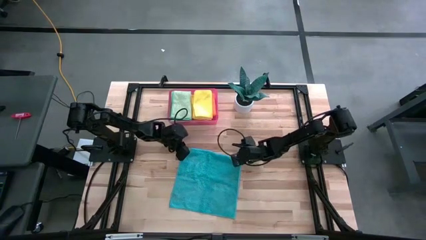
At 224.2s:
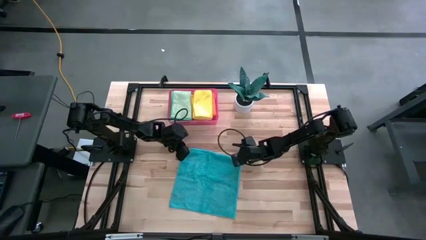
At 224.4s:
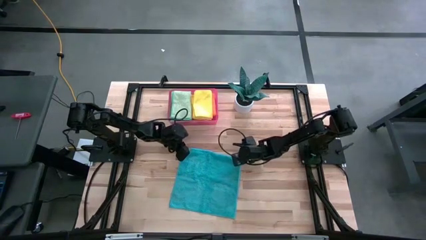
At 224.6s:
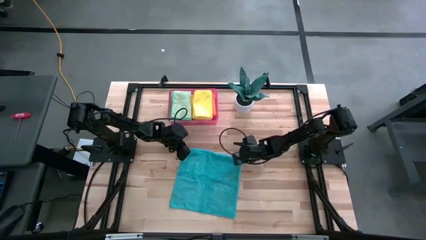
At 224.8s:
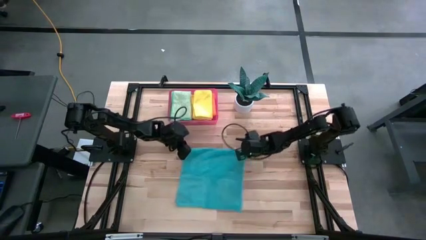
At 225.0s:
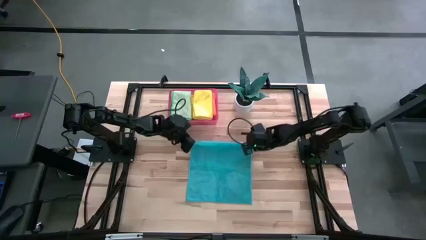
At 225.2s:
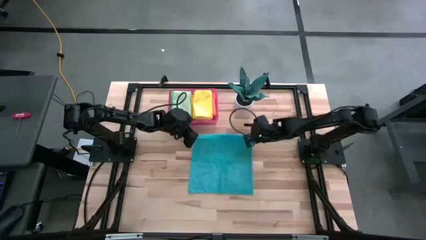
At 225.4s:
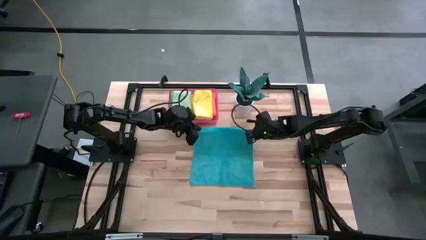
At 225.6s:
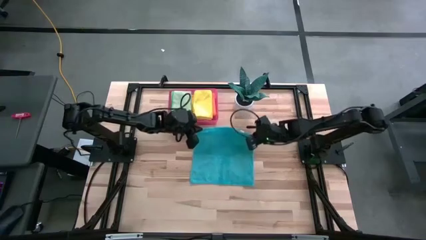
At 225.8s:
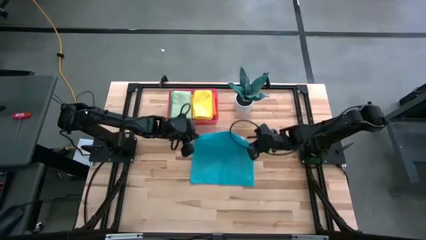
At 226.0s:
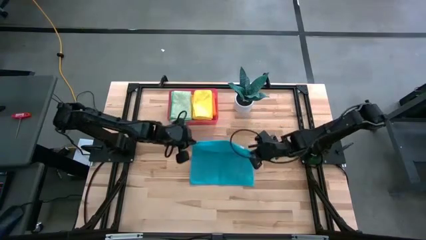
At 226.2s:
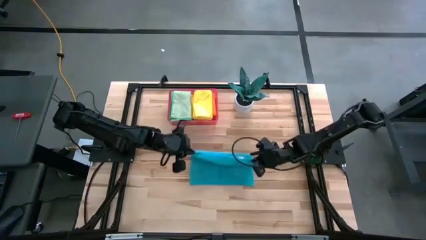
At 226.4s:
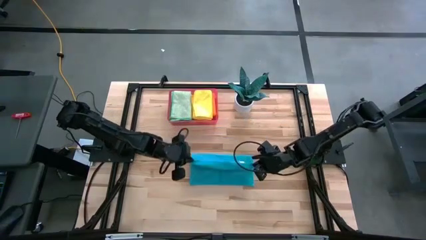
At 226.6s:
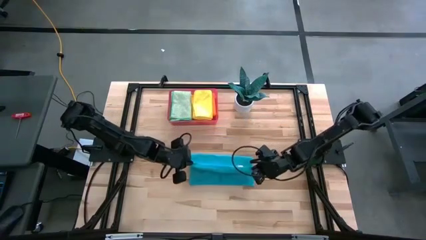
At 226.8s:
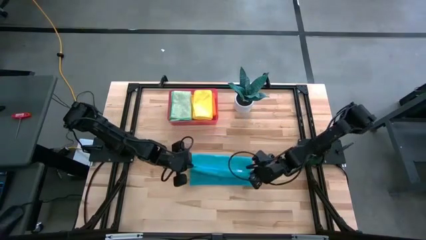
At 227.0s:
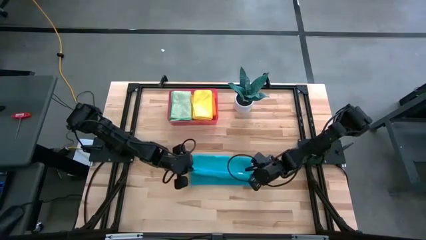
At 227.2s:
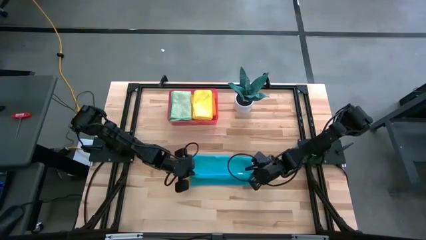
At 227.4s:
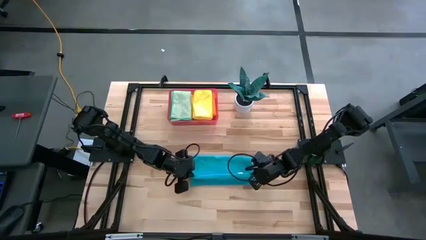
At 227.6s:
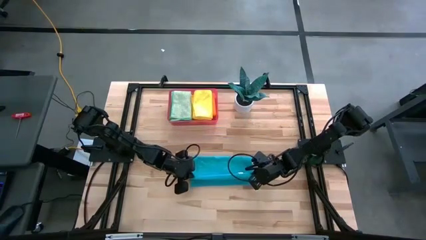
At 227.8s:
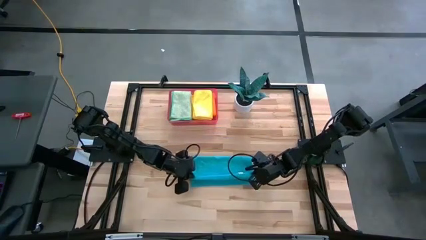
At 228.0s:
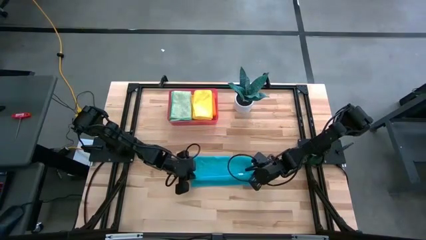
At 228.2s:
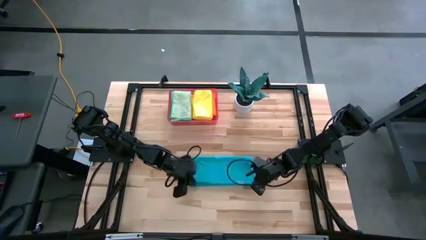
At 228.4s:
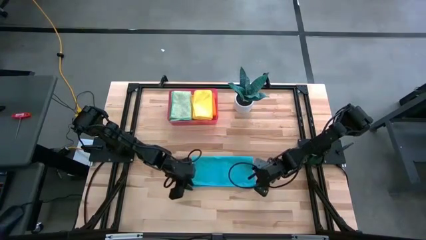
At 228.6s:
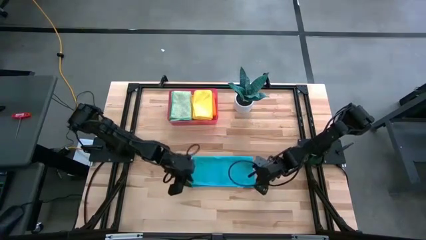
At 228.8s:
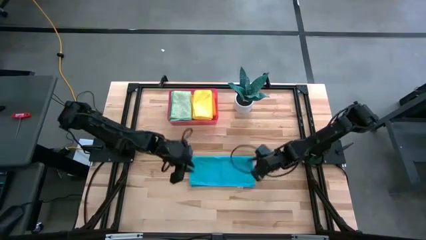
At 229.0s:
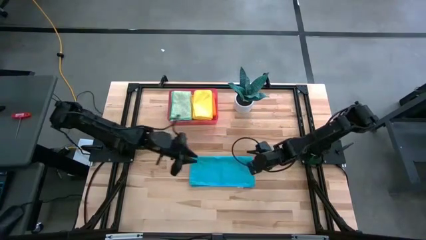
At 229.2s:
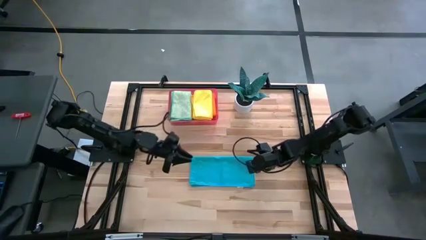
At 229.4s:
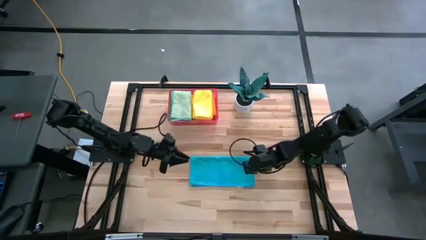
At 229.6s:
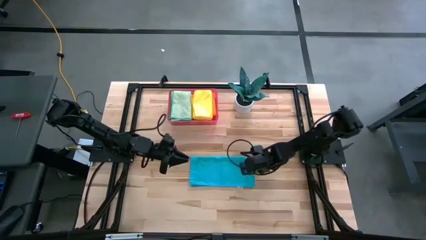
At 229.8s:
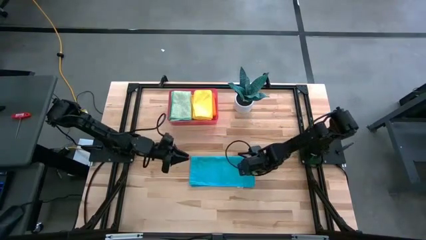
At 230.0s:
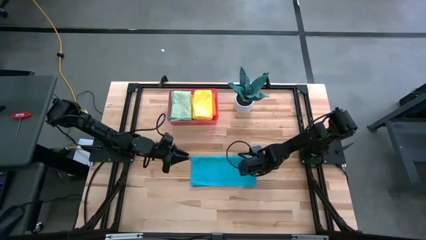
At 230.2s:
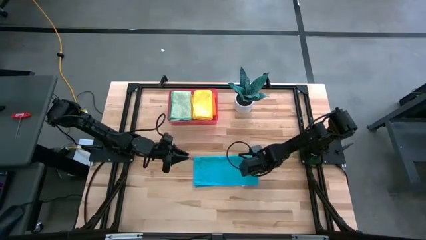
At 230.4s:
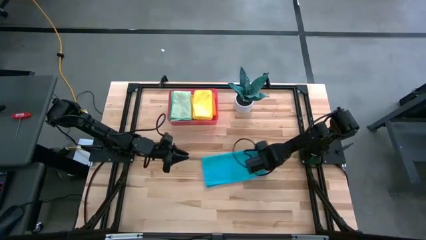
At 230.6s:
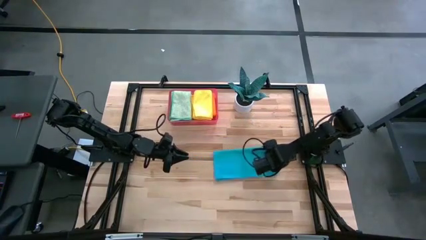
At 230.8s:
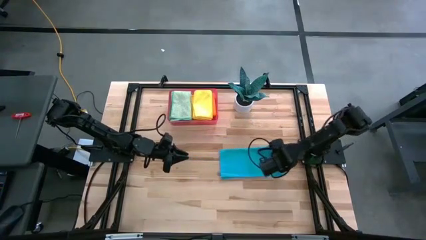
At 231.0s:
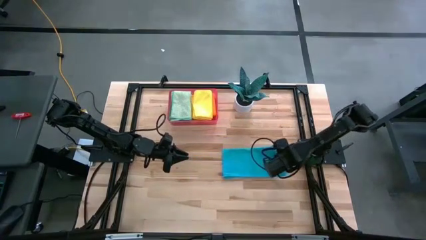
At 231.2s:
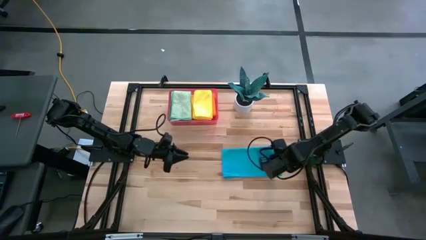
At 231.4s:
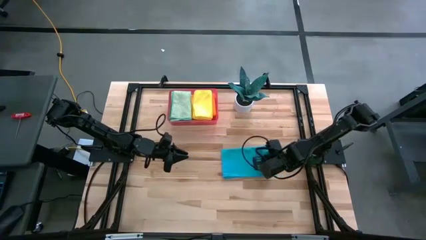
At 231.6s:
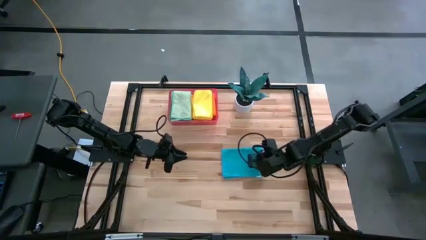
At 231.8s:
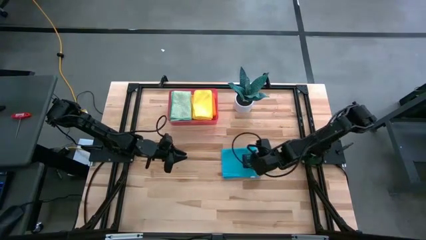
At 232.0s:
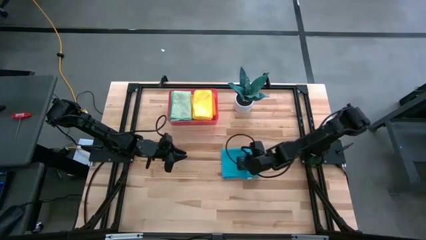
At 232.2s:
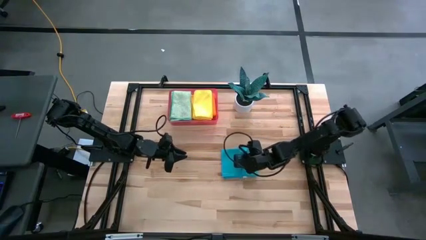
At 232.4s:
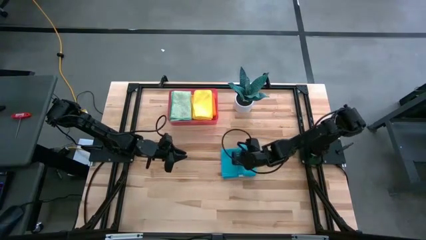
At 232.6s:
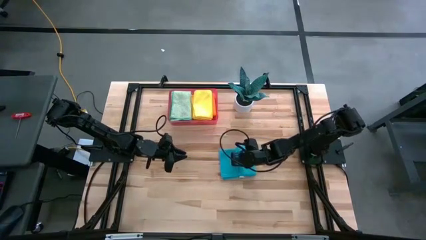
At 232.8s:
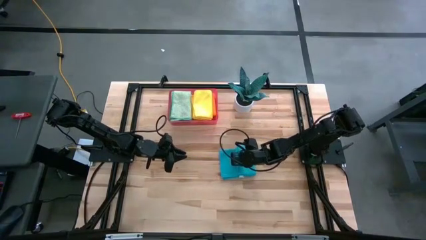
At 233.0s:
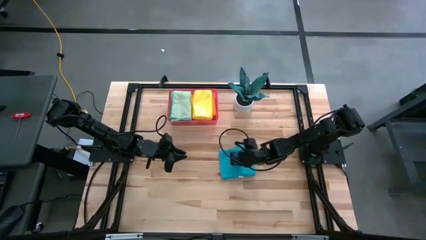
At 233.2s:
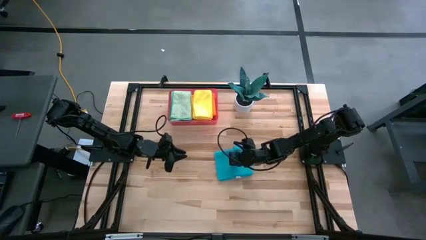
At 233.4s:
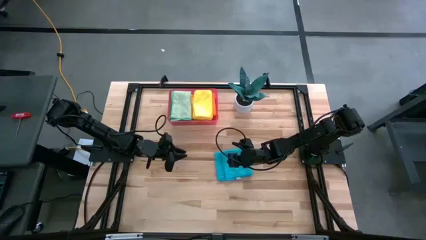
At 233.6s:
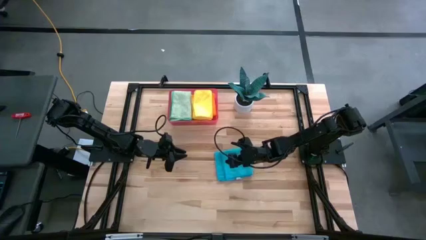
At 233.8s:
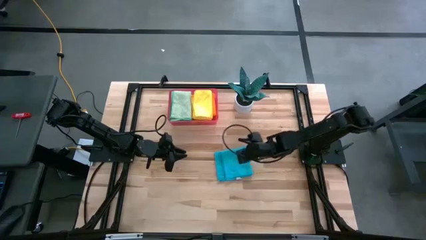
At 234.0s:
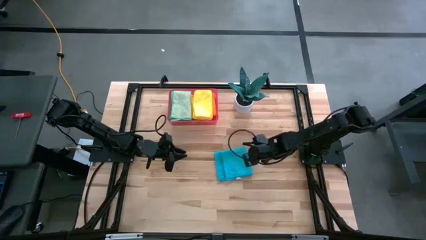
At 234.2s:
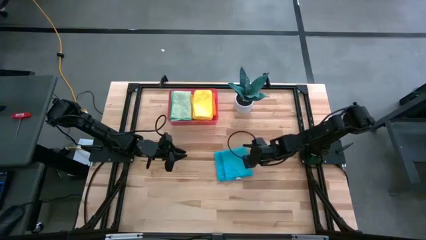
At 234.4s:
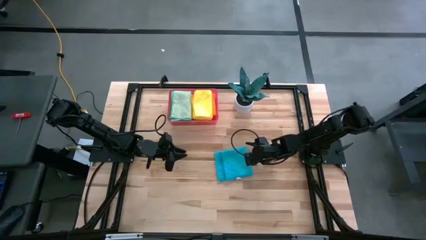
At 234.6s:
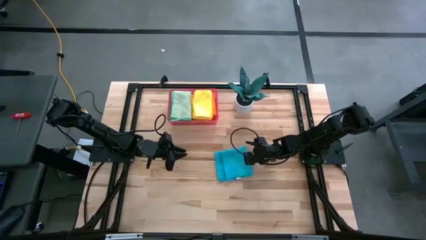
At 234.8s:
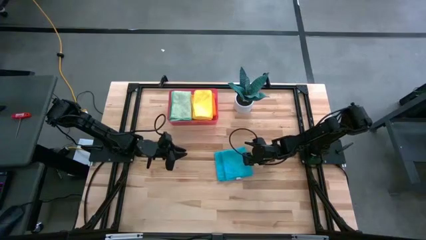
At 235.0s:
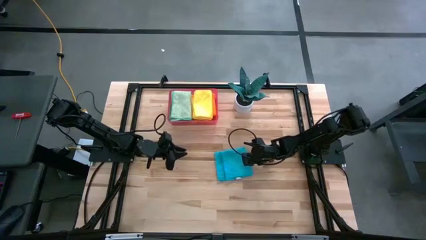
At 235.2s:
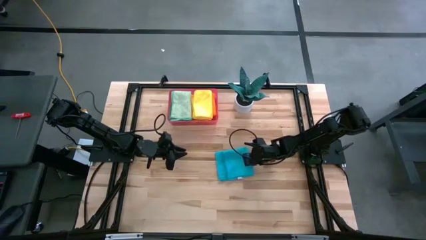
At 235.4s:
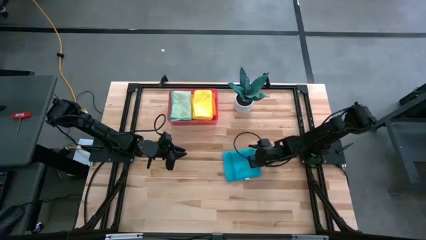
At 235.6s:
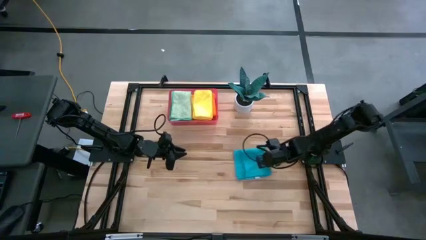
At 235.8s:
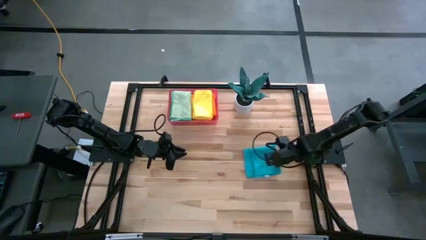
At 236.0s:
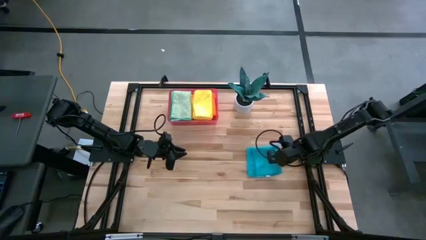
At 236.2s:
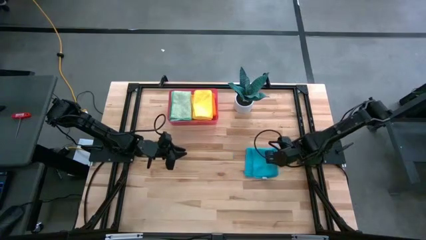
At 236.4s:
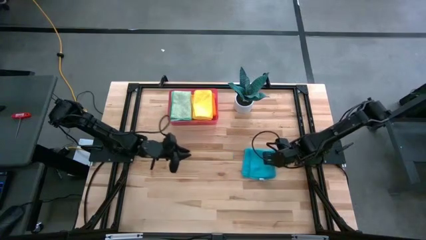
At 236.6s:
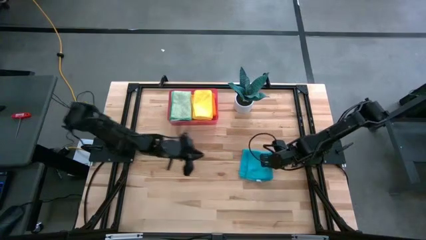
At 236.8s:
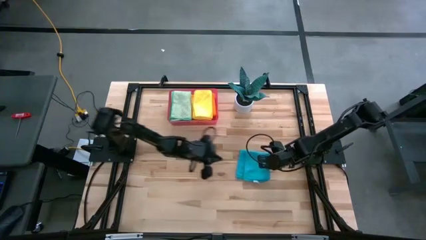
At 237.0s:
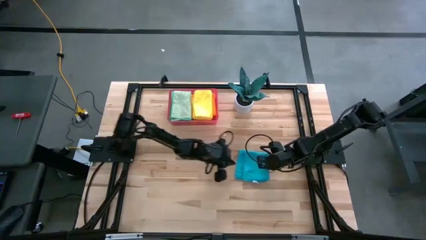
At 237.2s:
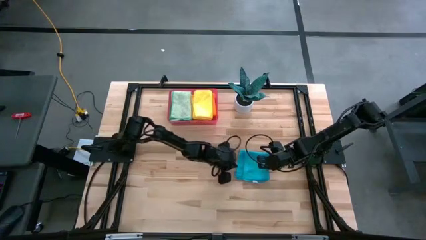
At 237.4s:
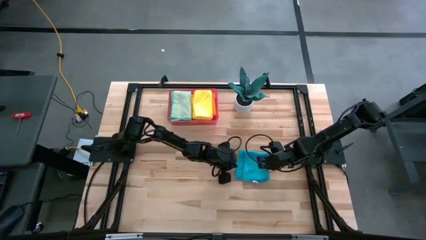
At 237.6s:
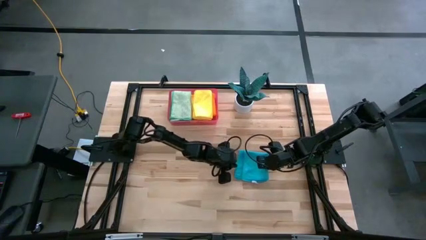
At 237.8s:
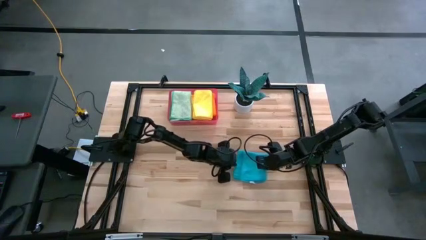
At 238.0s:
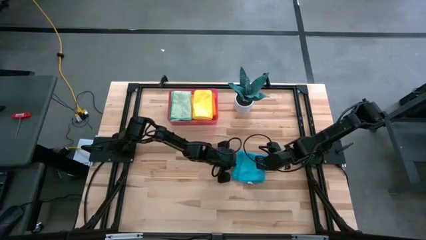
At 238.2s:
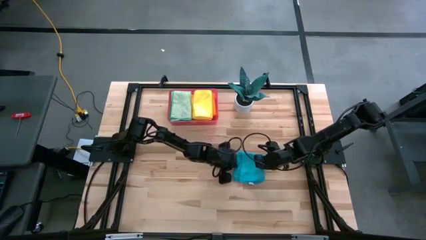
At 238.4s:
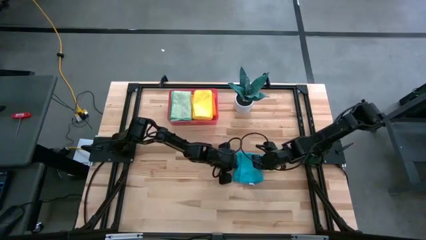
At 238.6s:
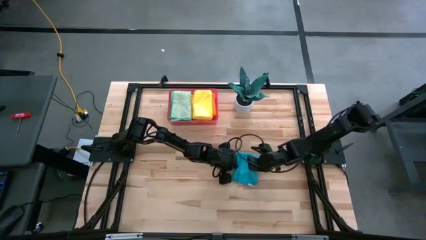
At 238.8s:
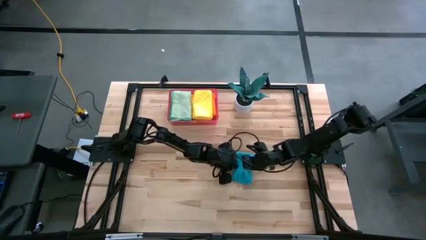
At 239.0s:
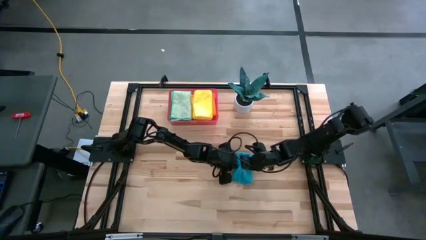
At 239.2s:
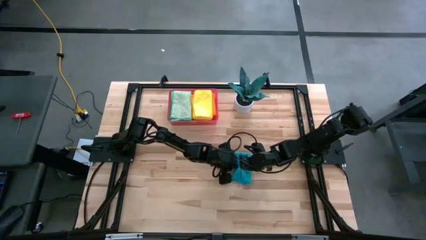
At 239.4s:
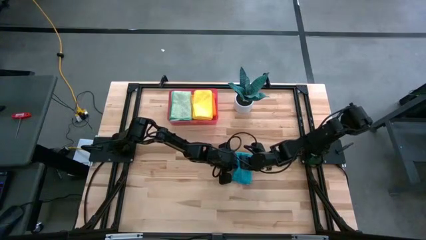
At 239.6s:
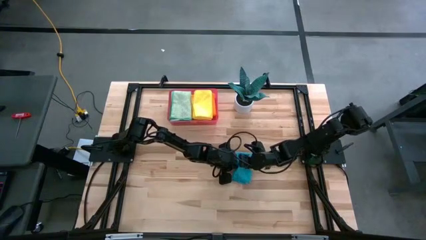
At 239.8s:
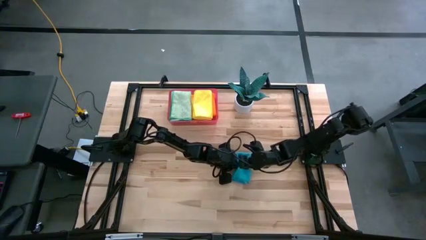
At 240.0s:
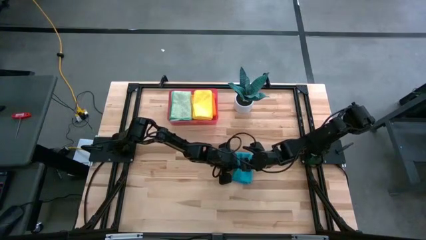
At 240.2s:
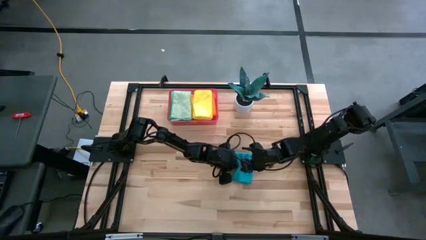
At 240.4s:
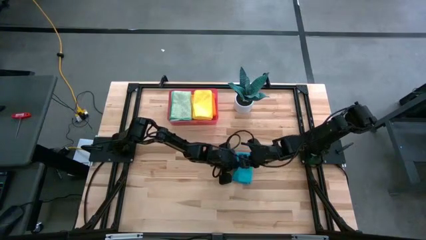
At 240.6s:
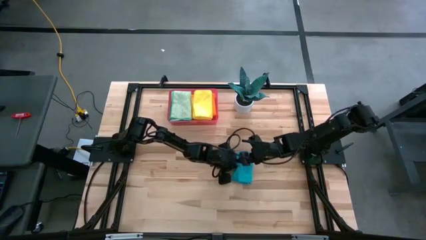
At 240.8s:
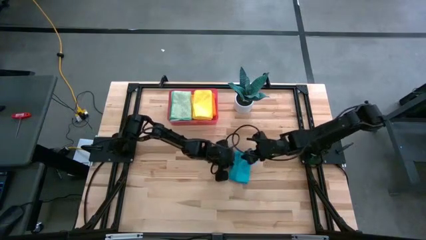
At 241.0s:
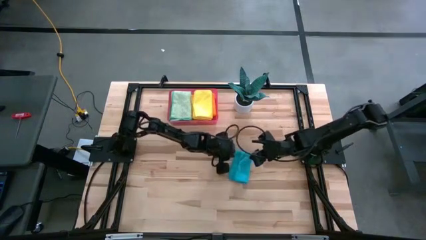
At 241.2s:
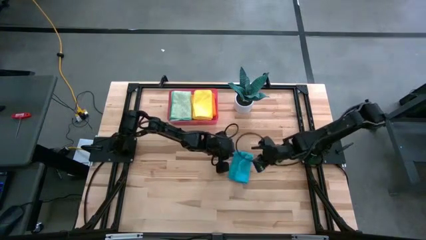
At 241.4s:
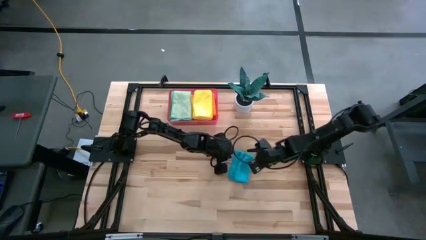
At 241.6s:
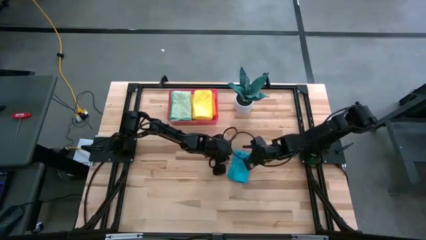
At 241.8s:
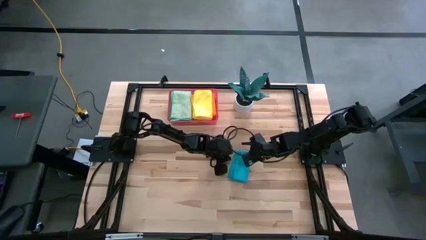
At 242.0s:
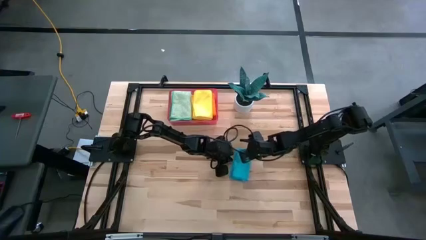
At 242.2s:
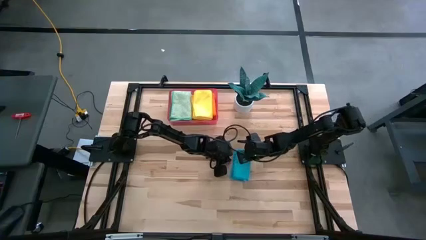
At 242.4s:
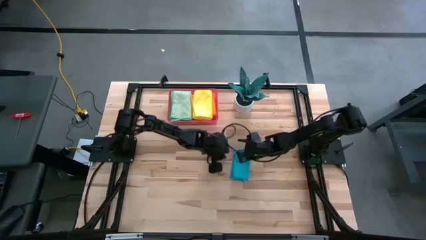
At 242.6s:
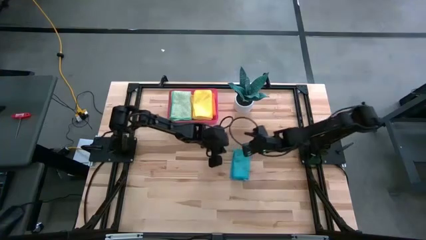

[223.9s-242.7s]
Task: Fold microfiber towels
Fold the blue microfiber towel
